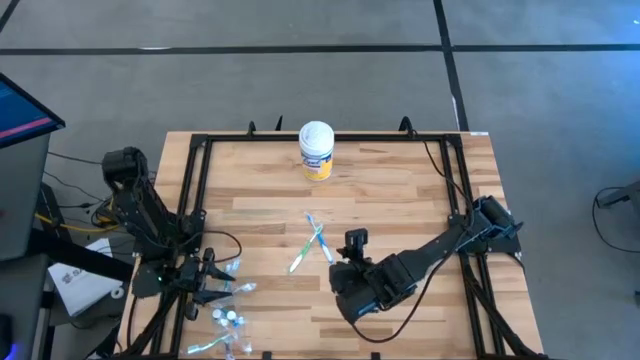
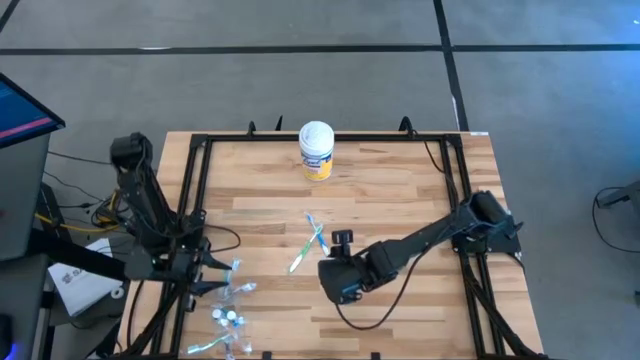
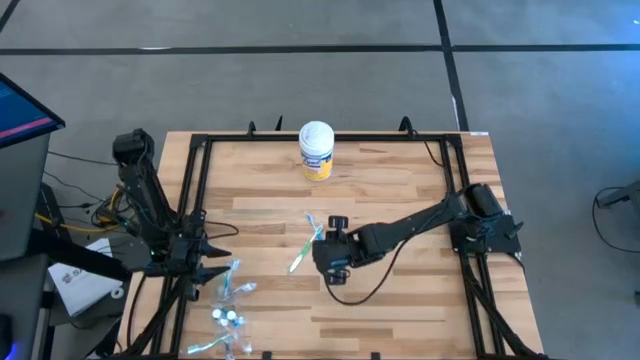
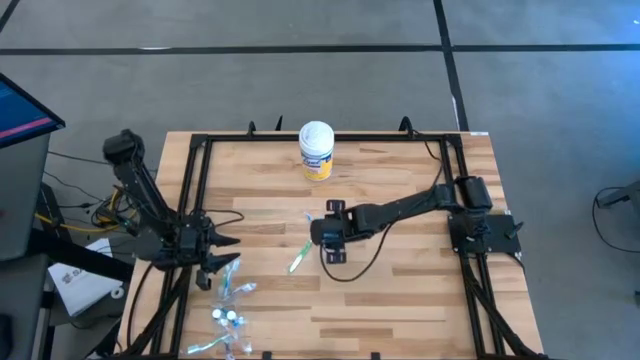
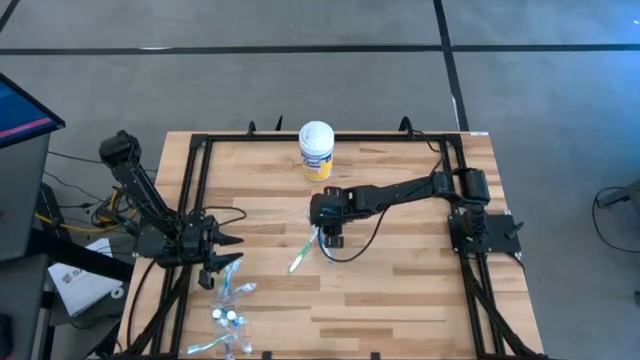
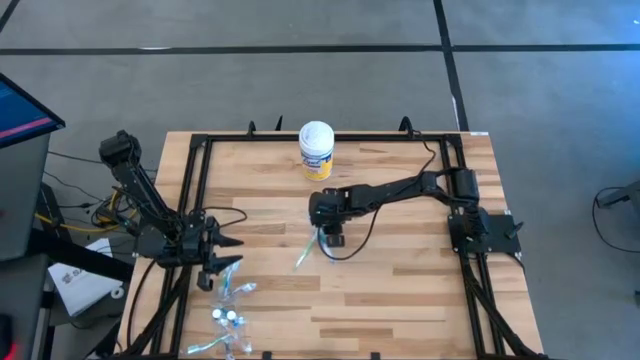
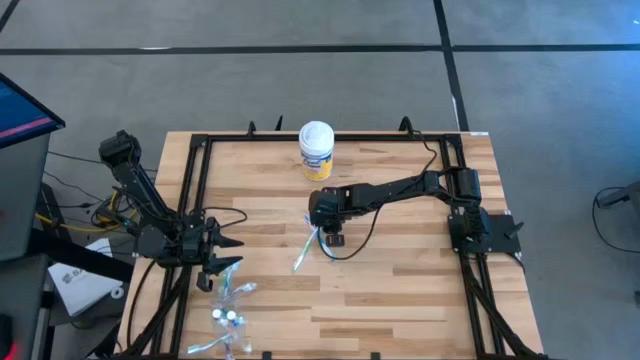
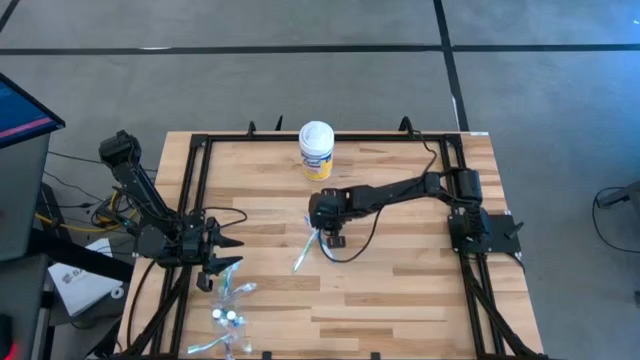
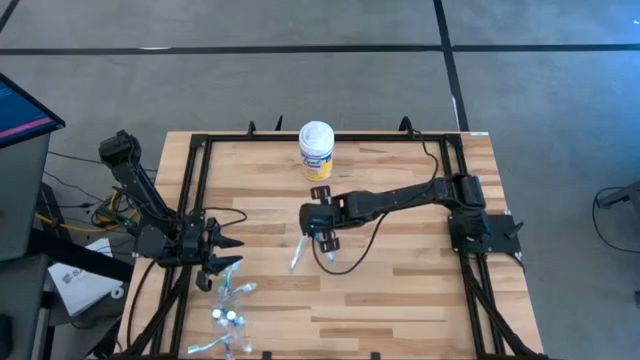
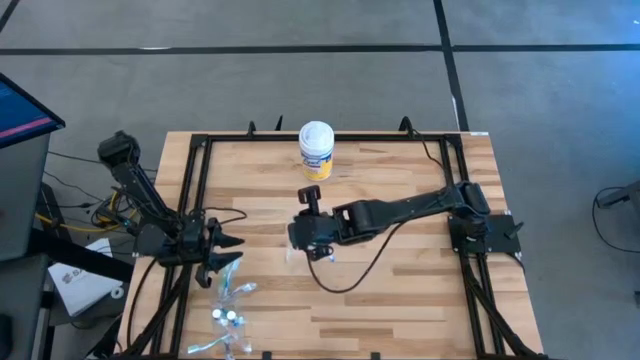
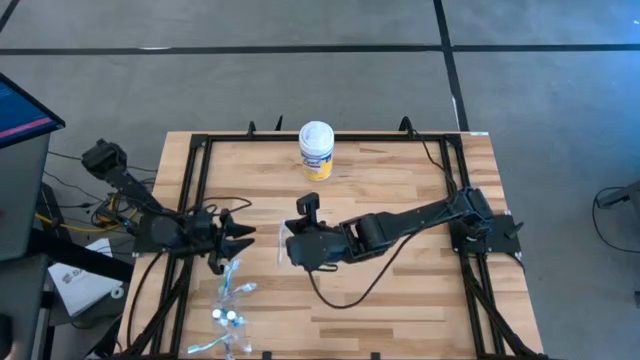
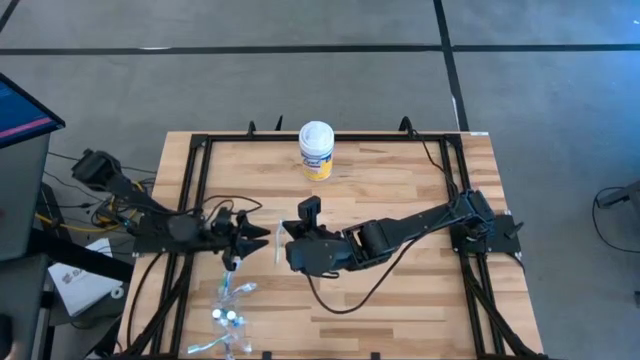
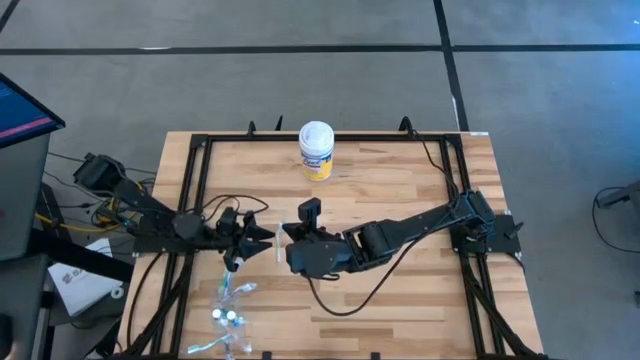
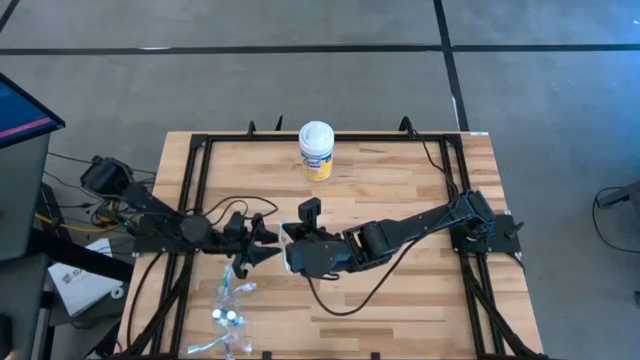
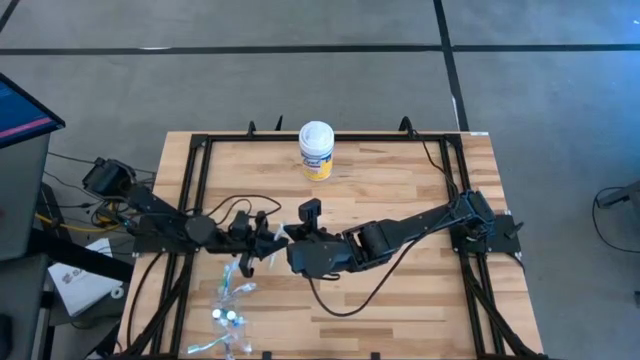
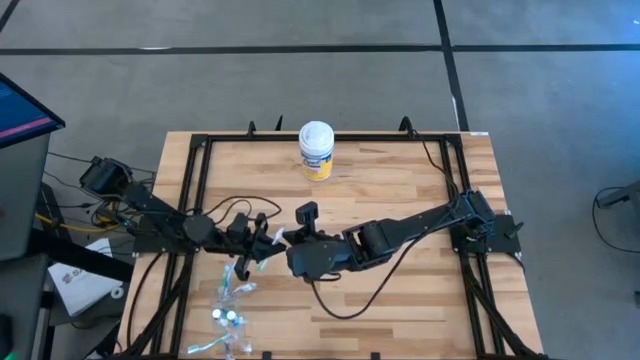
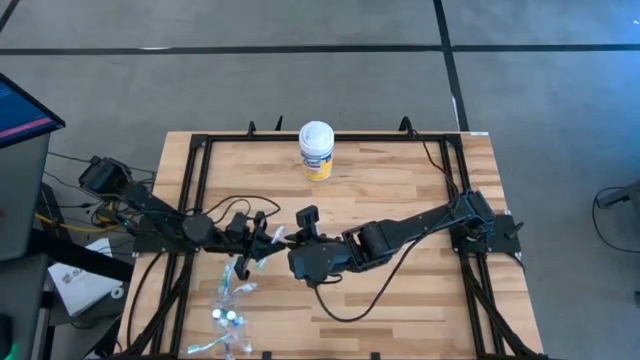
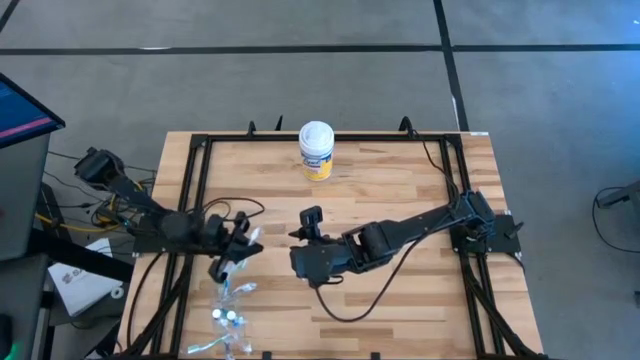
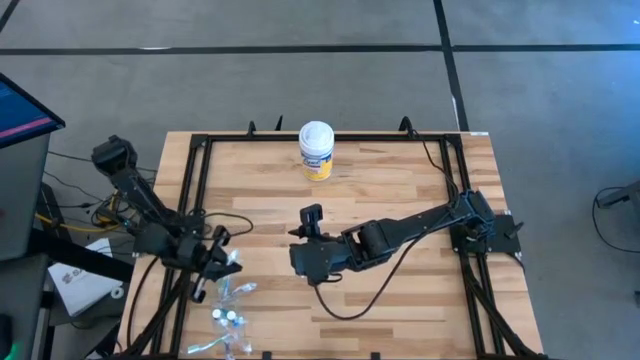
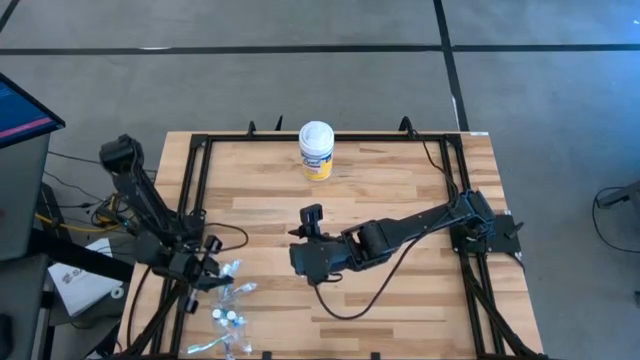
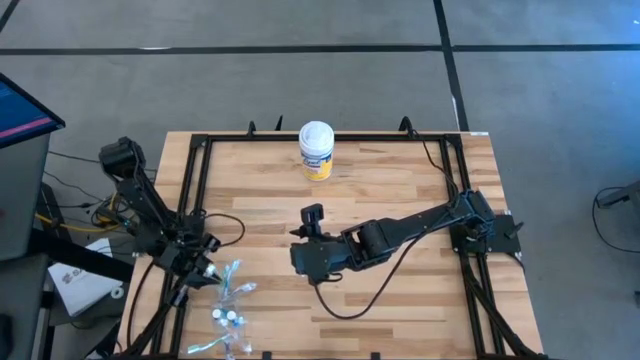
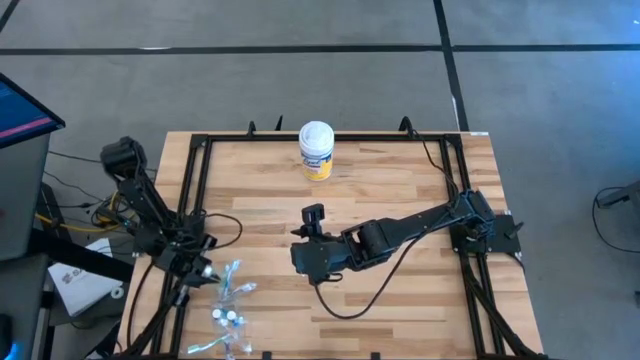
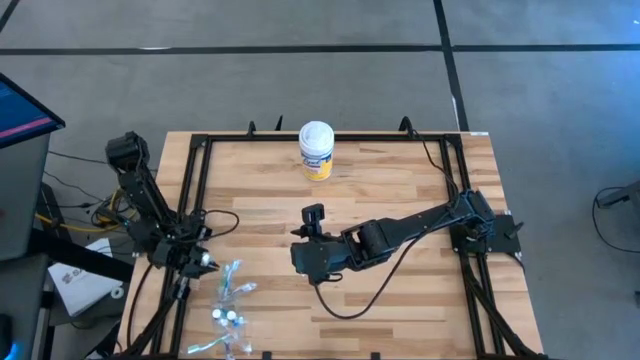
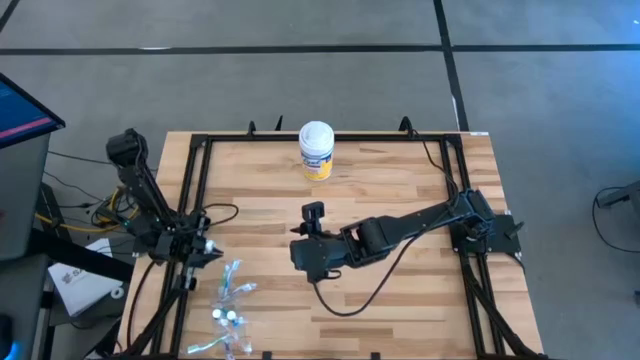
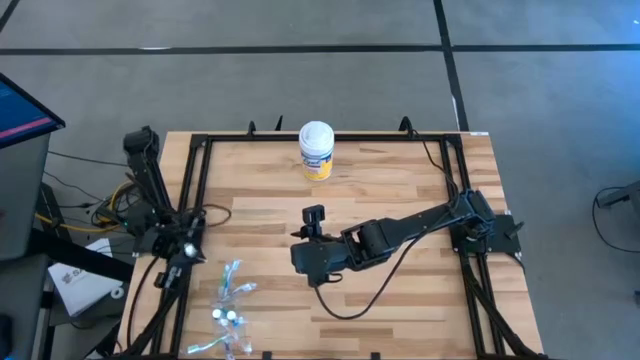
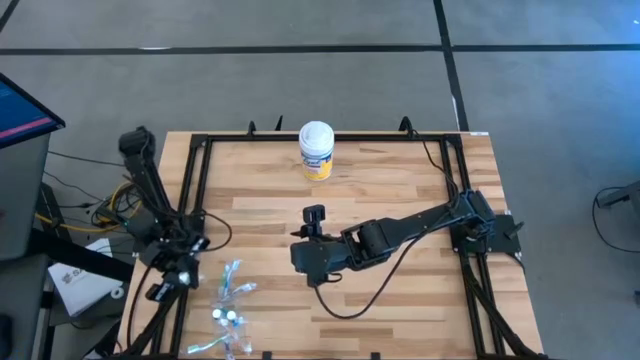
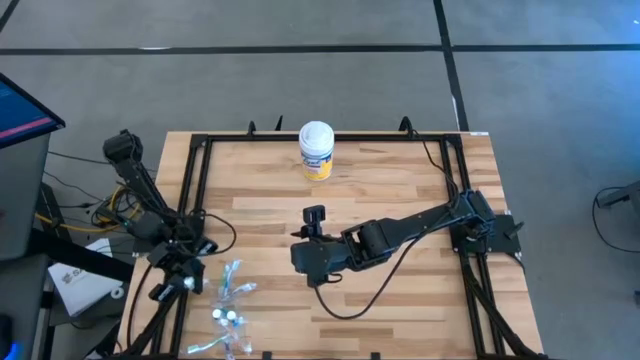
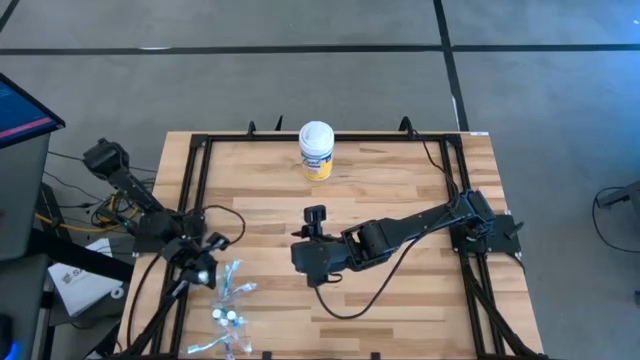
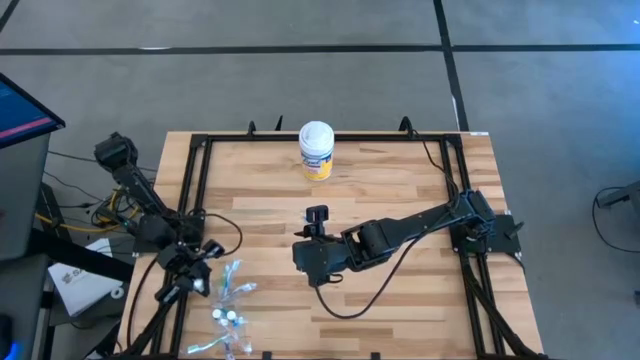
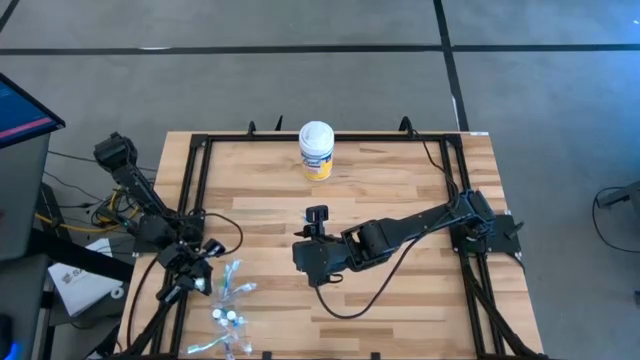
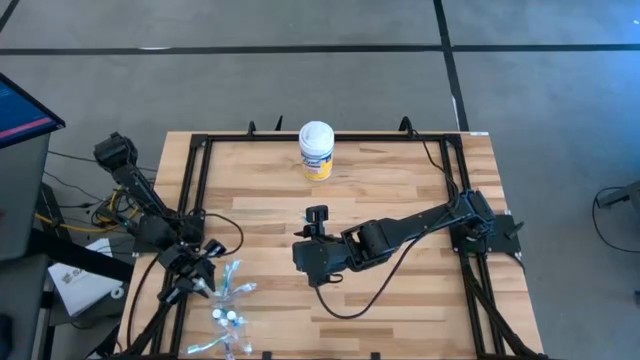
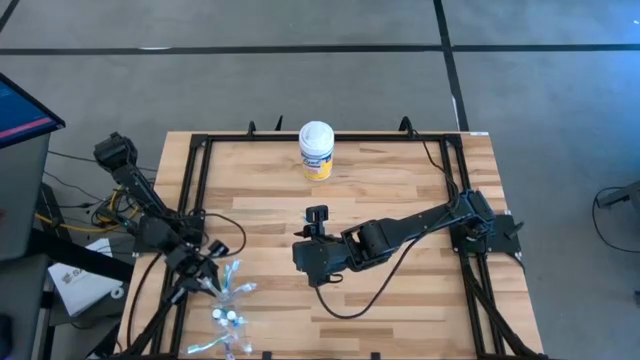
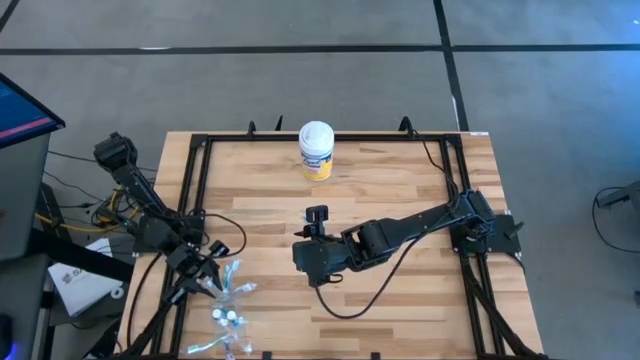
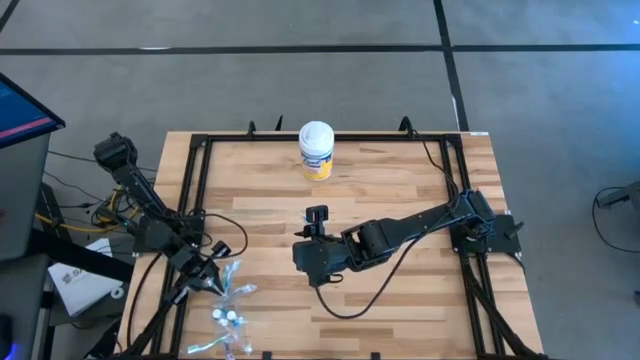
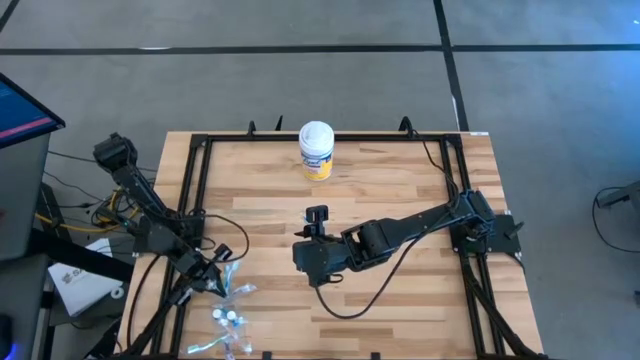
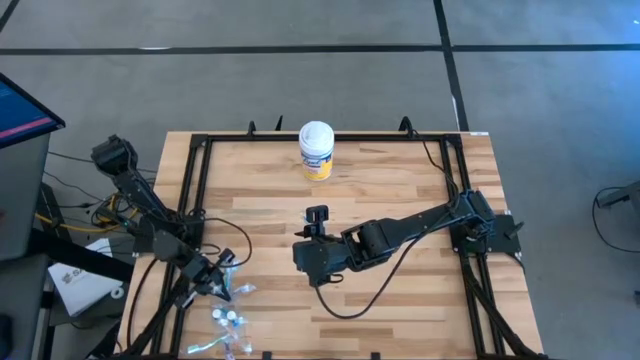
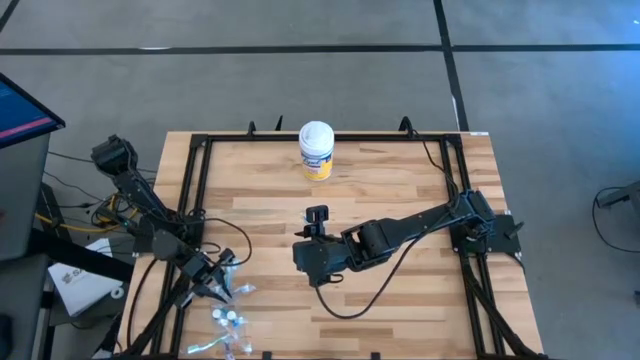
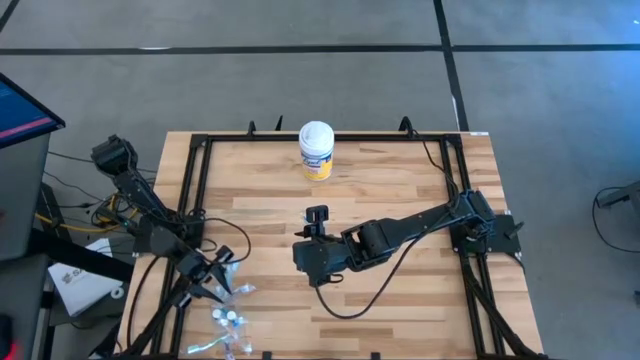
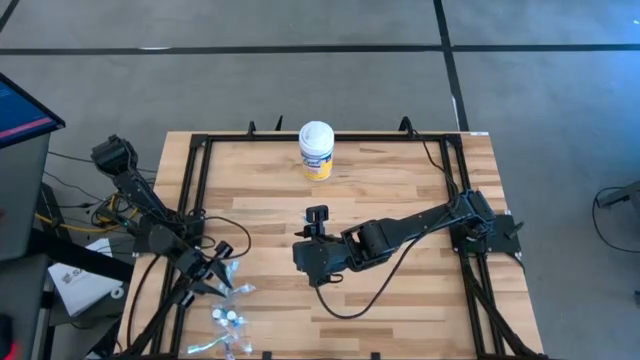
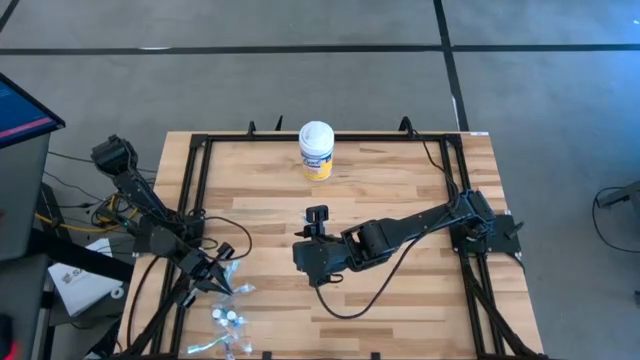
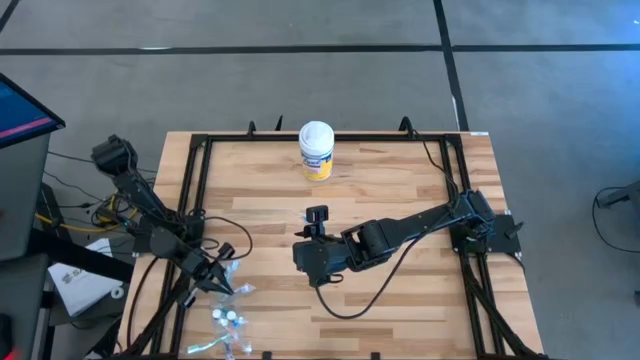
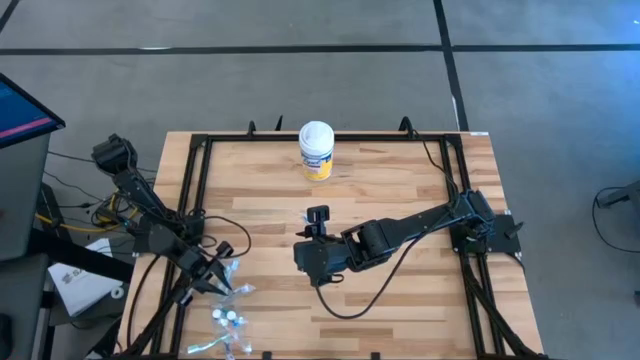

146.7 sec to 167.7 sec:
Task: Pick & Place toothbrushing station
Put the green toothbrush into the transparent organizer
